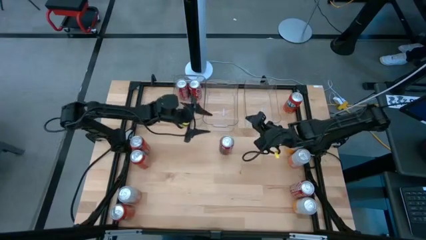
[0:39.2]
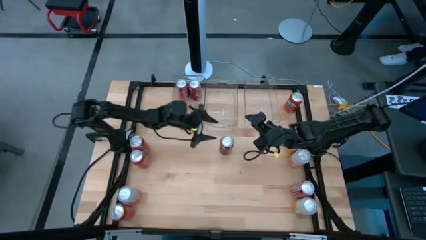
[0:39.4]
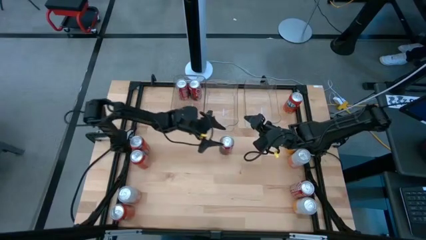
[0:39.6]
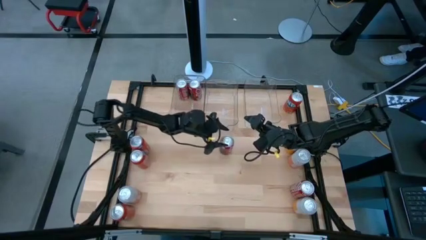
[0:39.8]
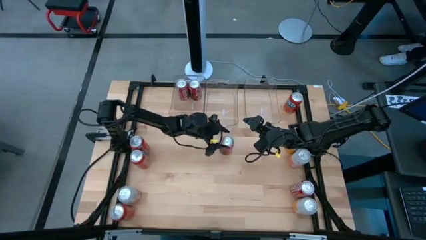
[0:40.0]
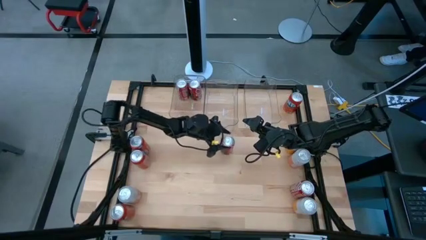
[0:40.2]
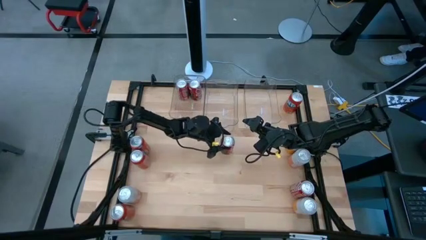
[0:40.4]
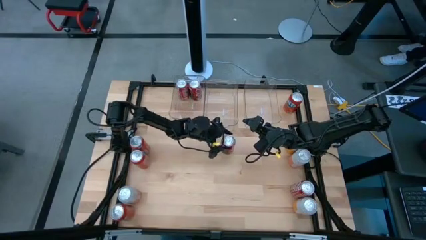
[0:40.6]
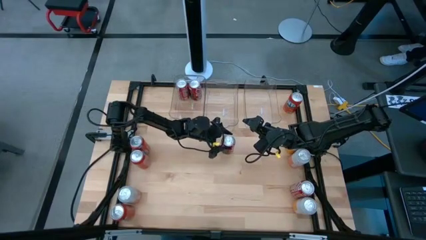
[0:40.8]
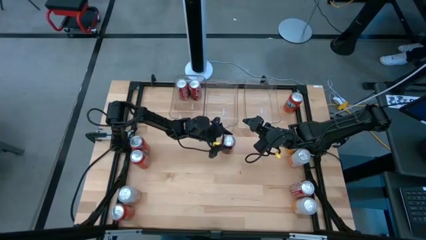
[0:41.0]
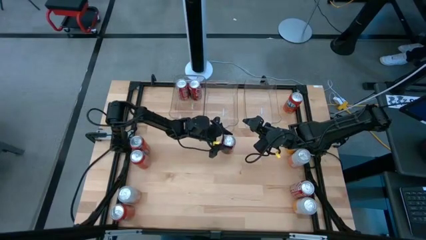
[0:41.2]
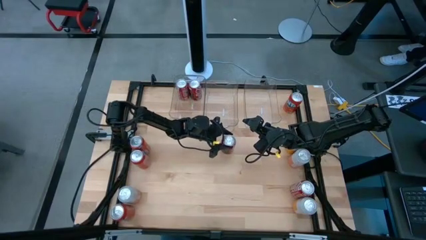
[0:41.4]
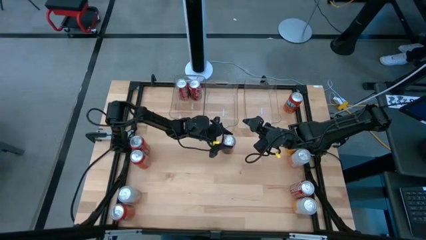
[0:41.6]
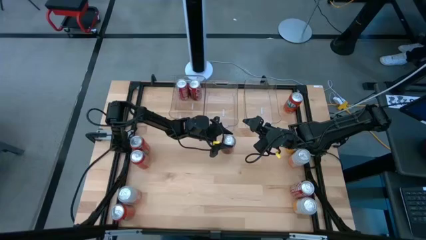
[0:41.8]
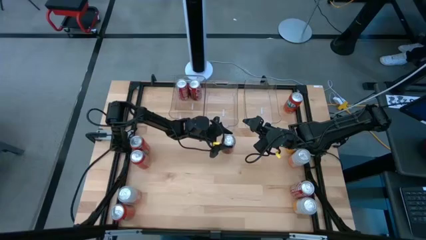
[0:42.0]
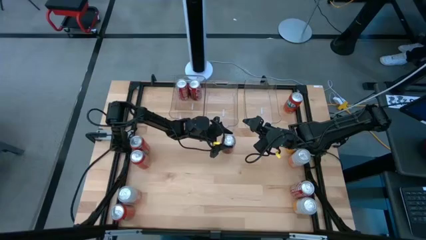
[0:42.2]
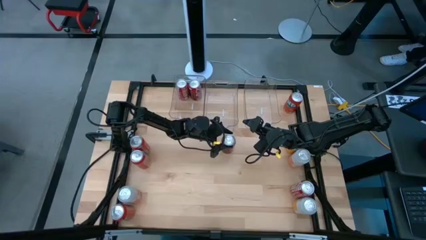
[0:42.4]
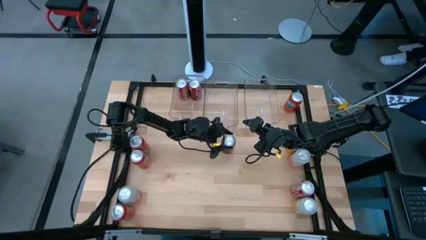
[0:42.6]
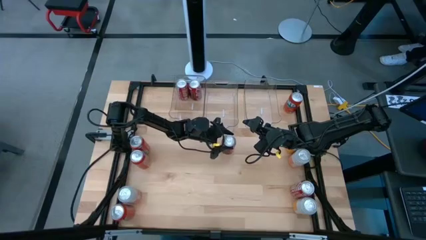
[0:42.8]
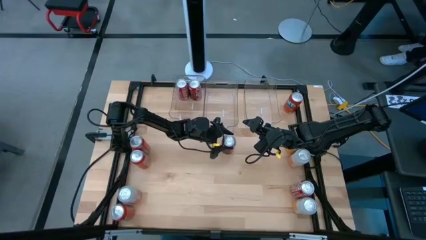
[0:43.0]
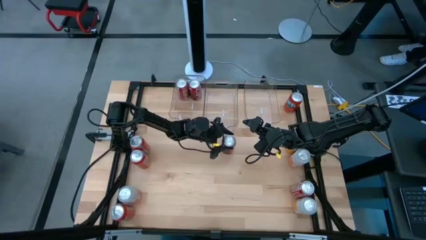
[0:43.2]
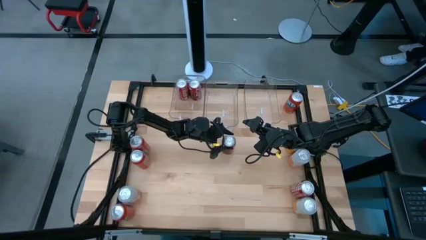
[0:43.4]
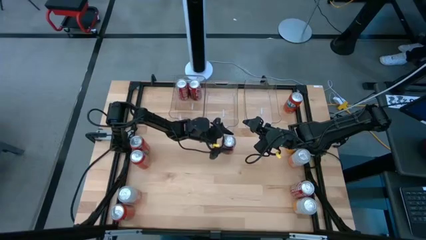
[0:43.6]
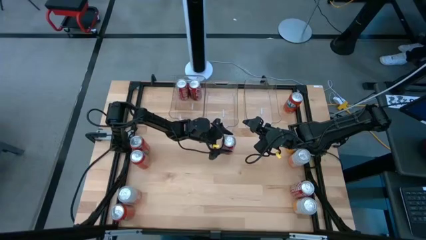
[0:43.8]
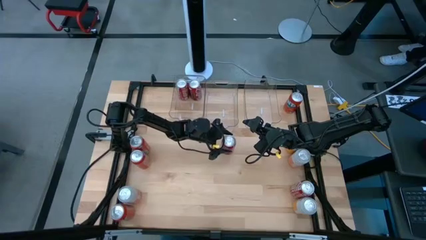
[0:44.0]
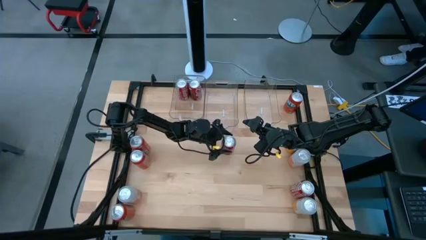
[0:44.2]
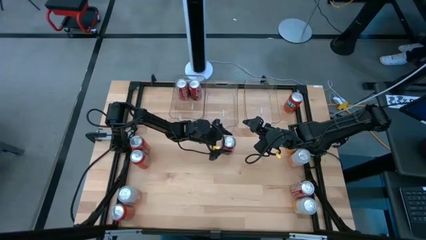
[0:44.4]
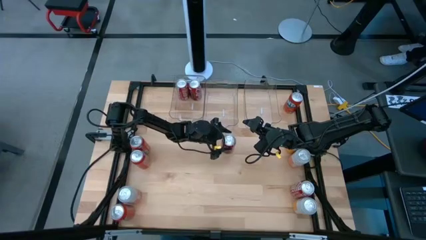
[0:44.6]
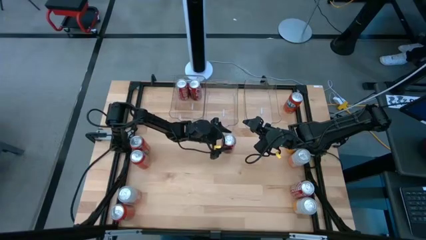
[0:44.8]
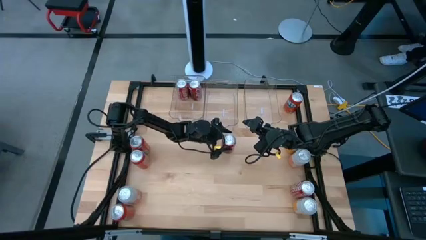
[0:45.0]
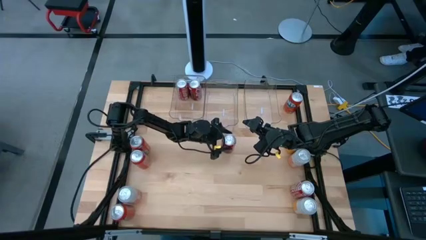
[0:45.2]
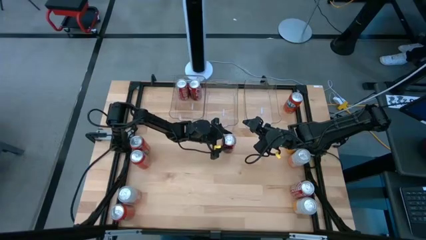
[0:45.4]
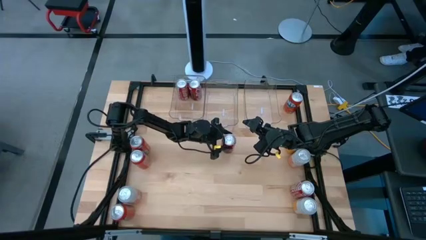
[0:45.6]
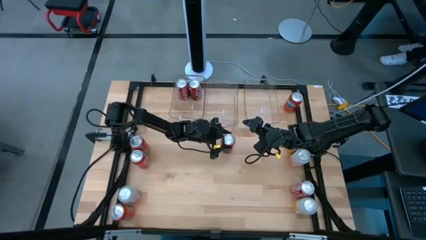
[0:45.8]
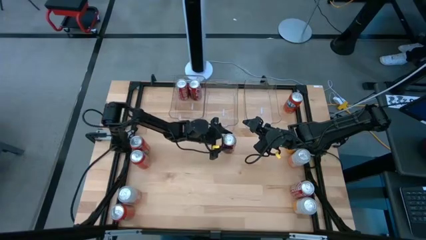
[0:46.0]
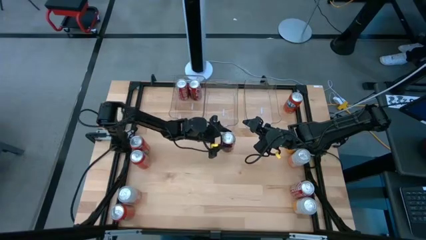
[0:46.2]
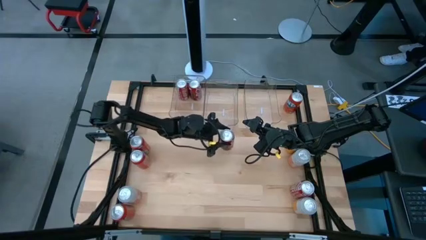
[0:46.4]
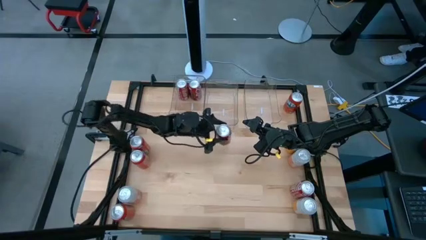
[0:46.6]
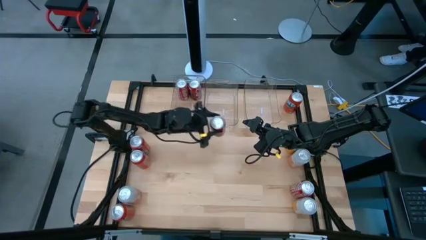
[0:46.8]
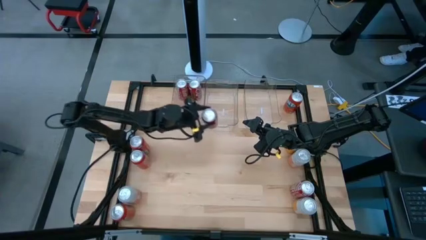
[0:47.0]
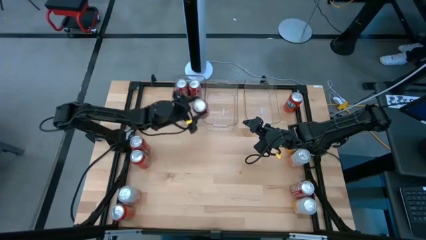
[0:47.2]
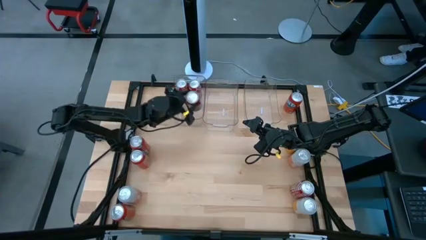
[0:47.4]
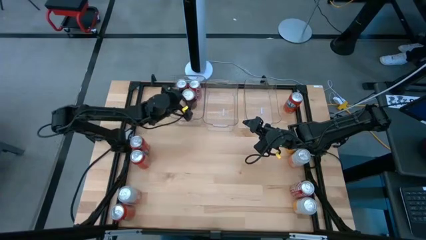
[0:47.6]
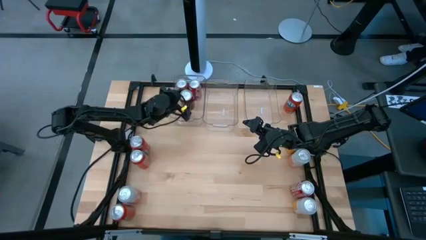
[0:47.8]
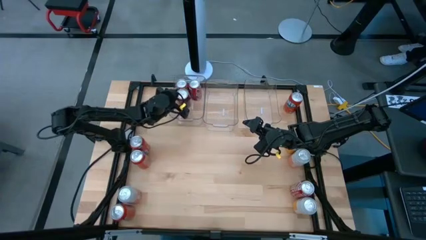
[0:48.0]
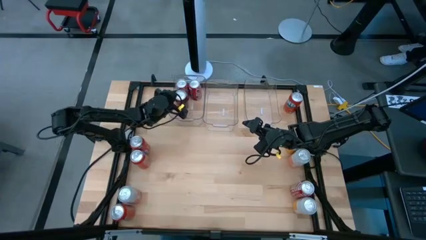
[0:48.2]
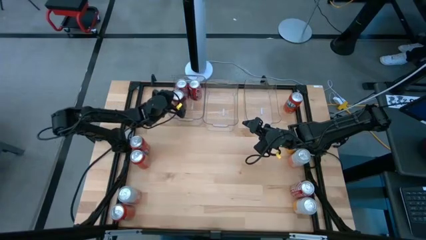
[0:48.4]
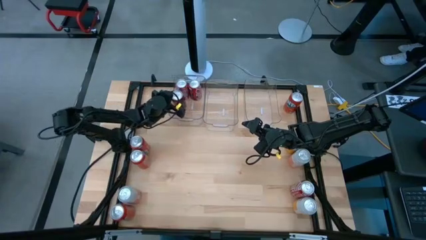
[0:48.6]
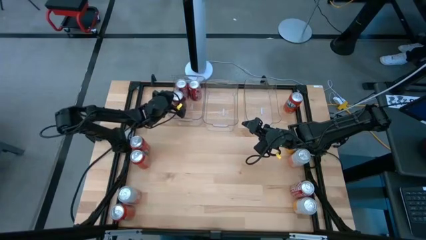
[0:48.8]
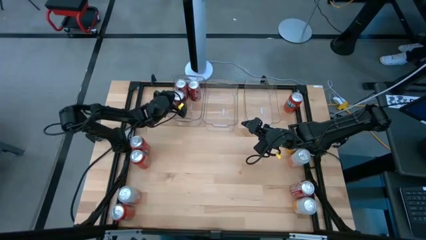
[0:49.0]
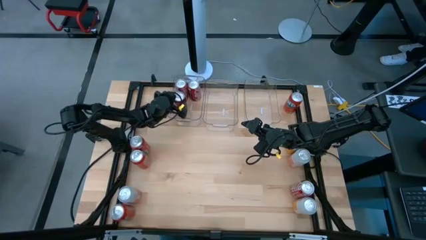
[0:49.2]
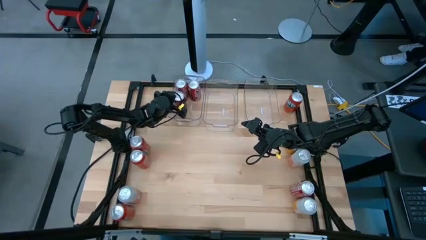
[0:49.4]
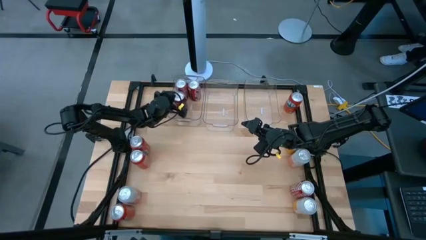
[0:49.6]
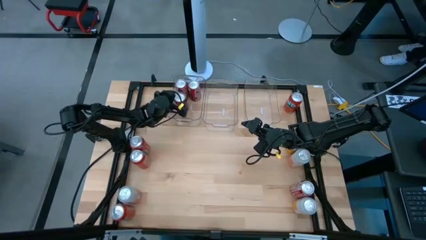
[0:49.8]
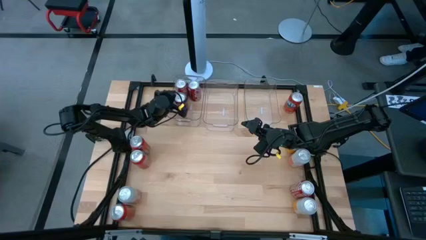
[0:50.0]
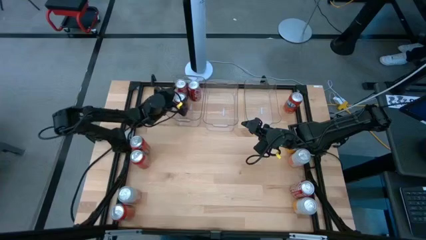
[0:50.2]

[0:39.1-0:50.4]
Task: Sort soda cans
Put the center red soda can into the left transparent bin

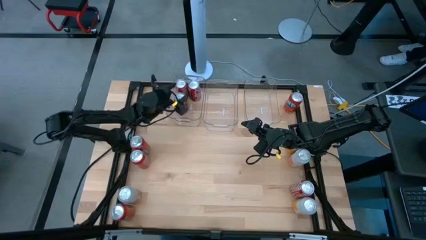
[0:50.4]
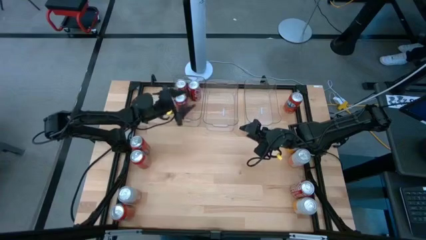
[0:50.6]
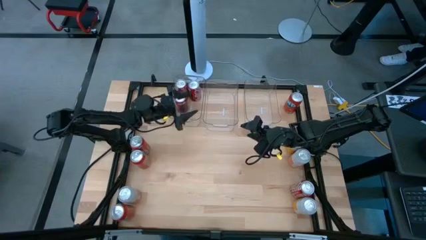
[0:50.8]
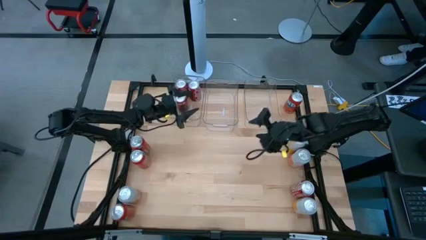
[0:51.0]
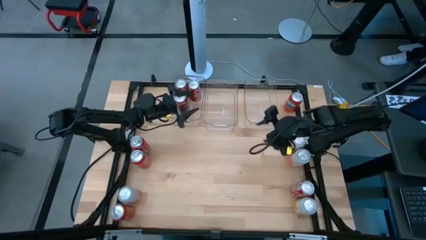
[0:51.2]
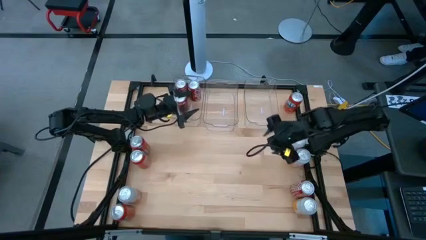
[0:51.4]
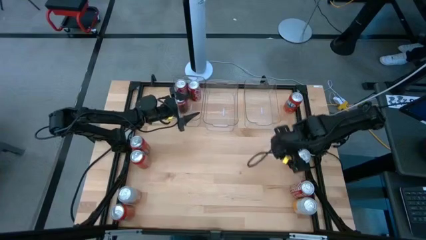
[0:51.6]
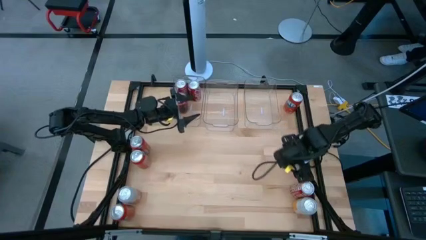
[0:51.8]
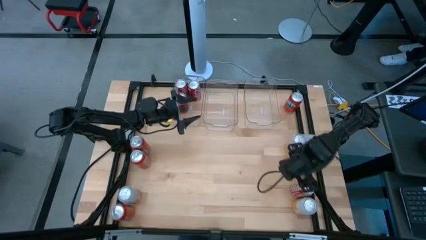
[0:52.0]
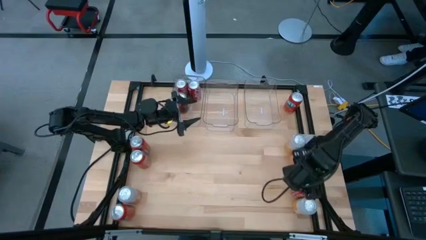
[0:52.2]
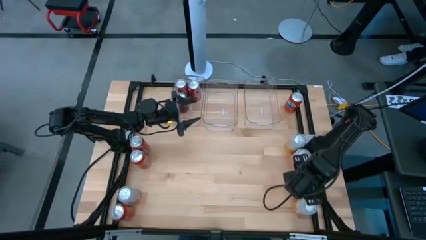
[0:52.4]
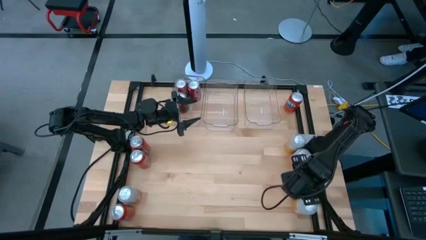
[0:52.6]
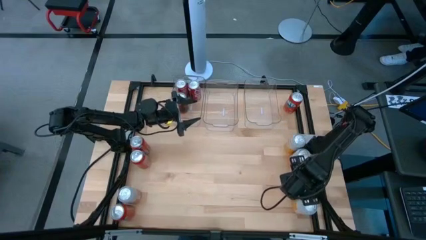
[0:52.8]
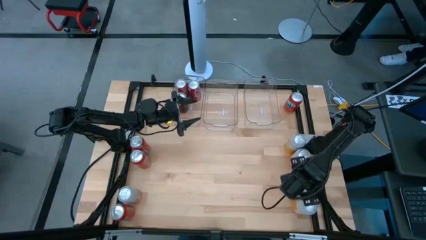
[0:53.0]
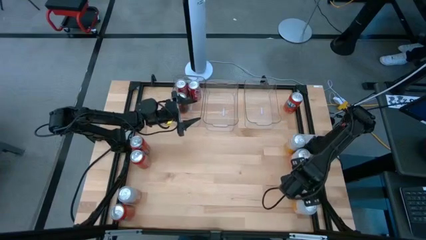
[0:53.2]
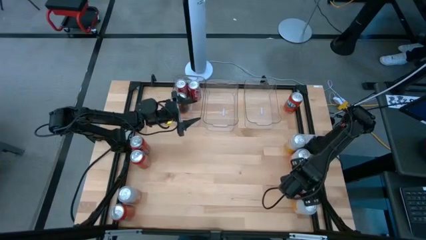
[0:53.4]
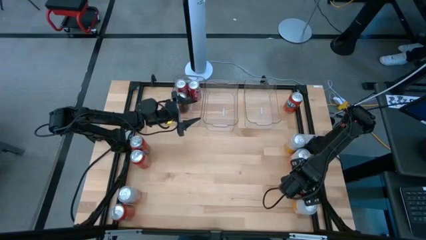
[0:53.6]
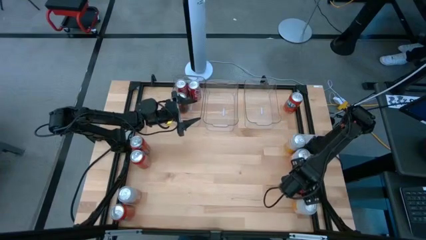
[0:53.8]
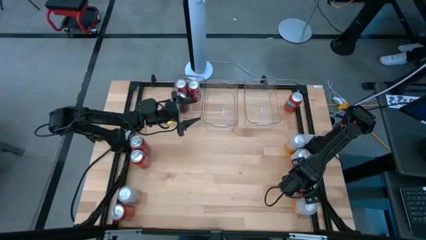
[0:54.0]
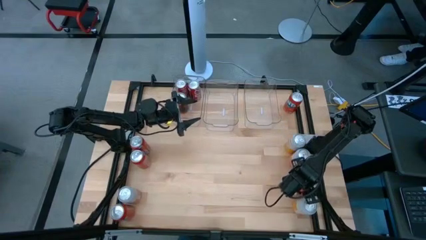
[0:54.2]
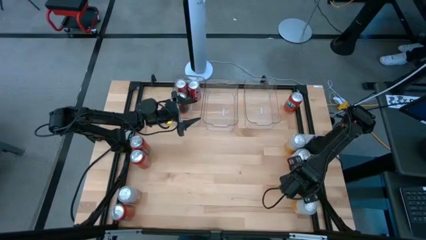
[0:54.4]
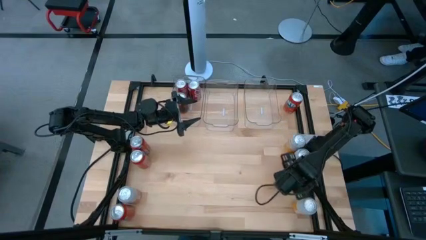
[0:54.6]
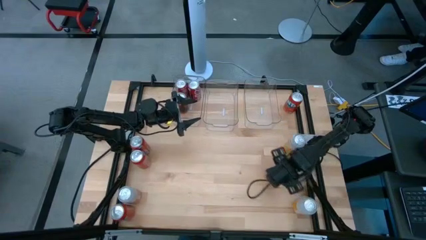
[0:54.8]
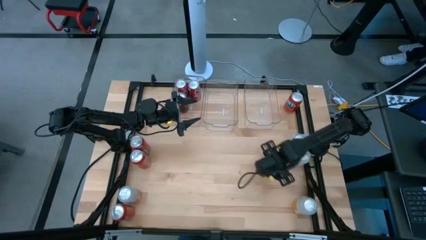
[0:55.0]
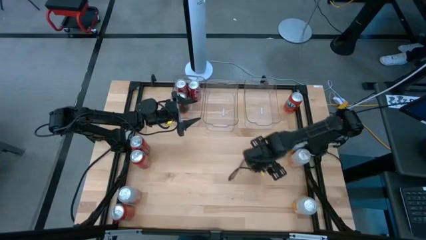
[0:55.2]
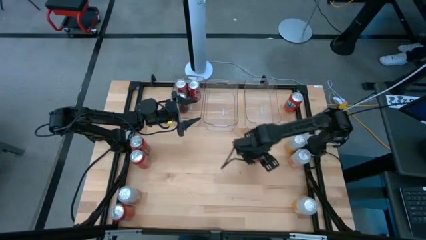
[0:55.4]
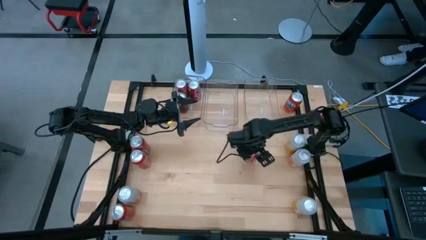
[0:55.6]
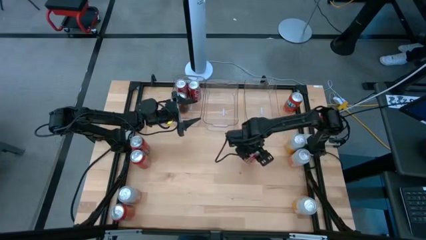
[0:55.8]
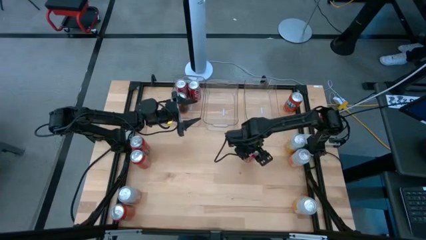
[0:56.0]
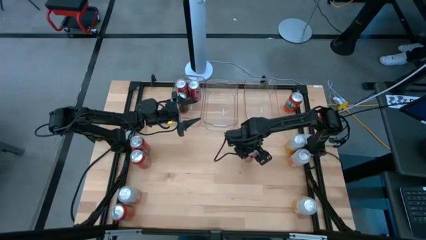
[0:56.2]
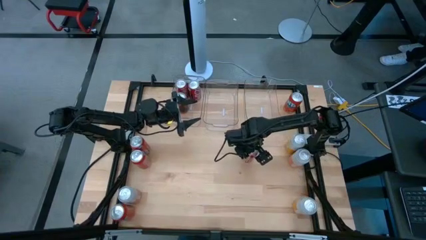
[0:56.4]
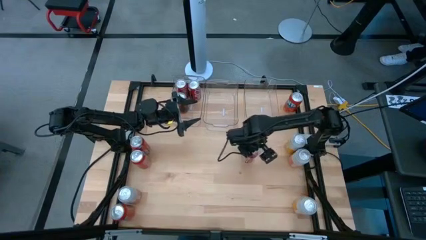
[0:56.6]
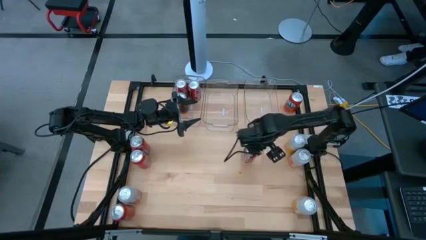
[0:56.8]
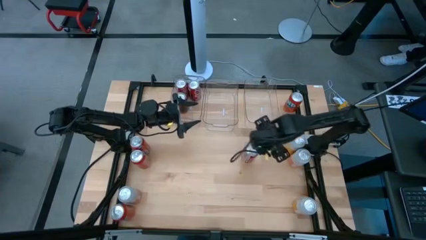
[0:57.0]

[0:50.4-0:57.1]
Move the middle right red soda can to the center of the table
